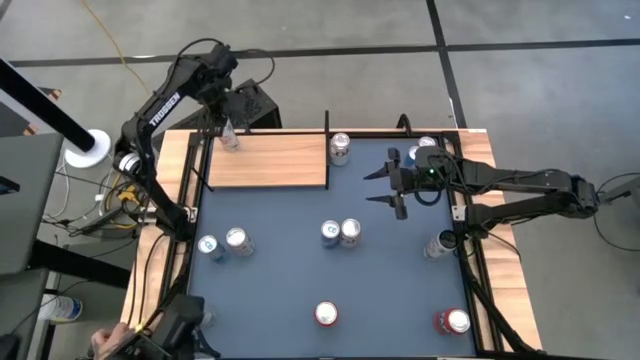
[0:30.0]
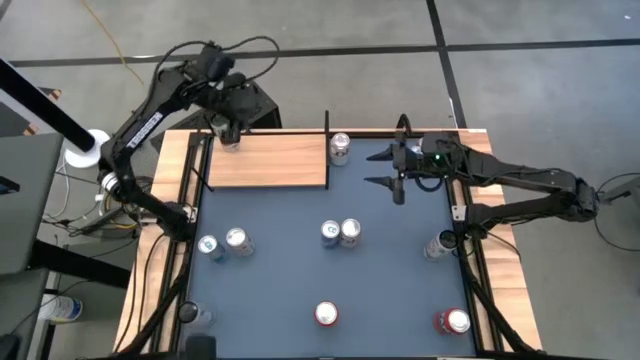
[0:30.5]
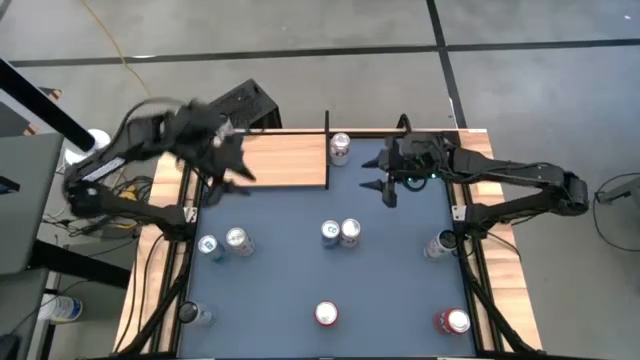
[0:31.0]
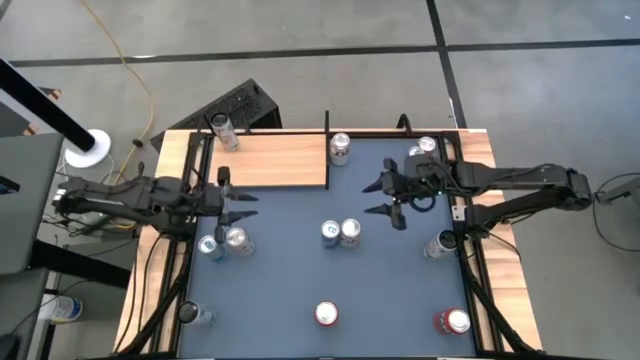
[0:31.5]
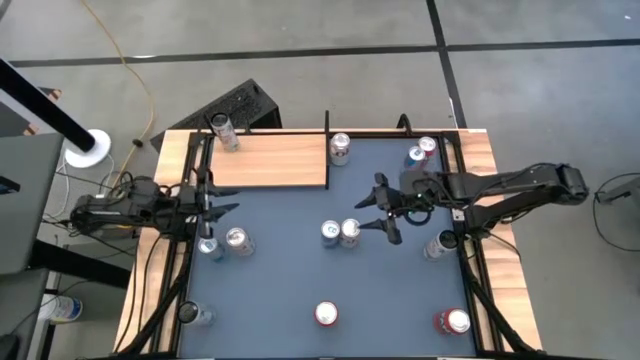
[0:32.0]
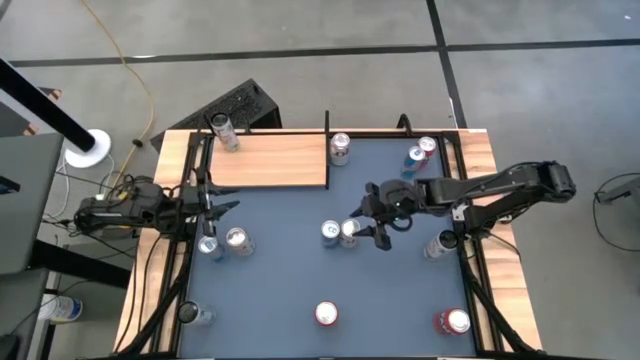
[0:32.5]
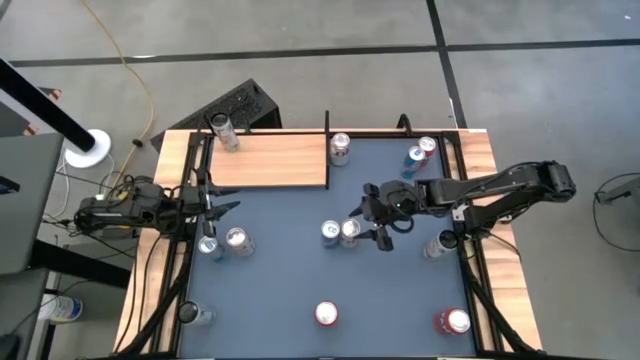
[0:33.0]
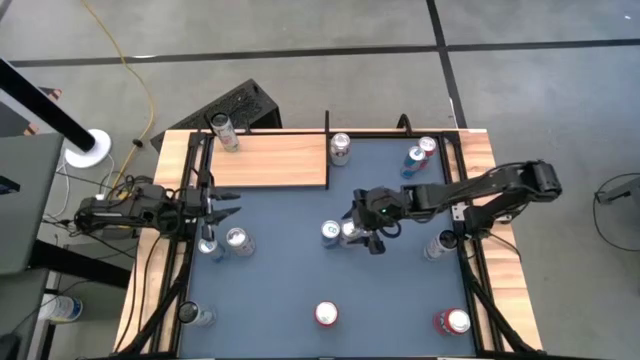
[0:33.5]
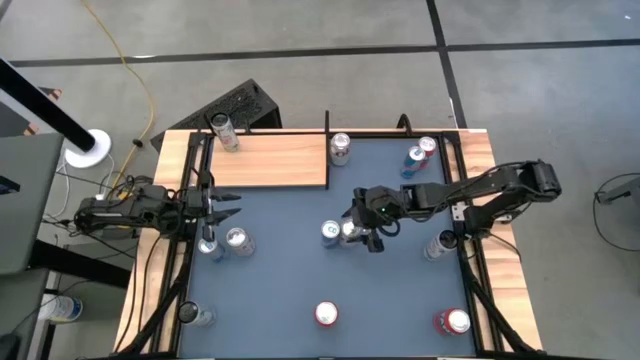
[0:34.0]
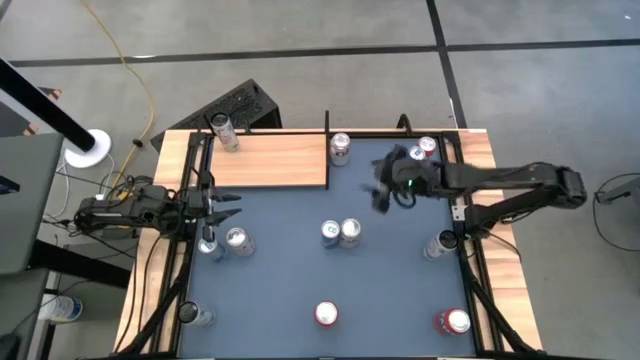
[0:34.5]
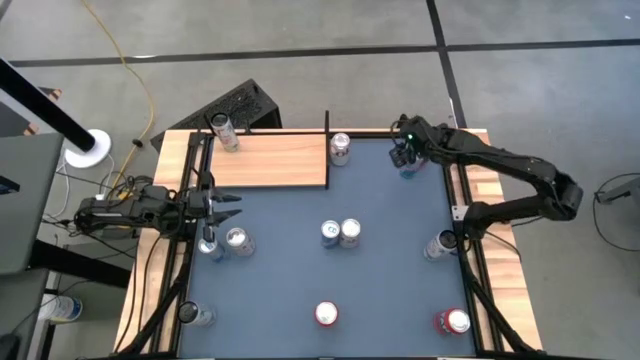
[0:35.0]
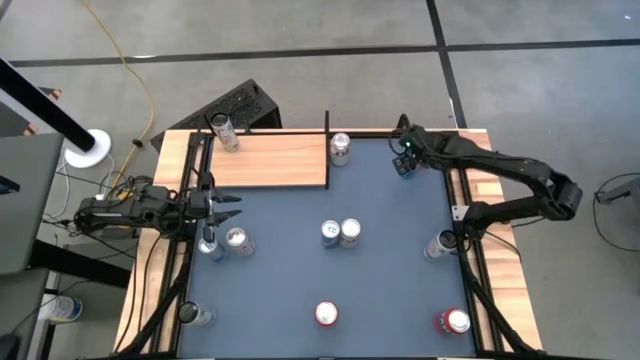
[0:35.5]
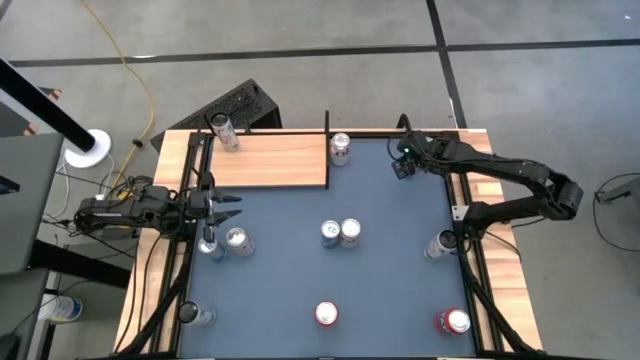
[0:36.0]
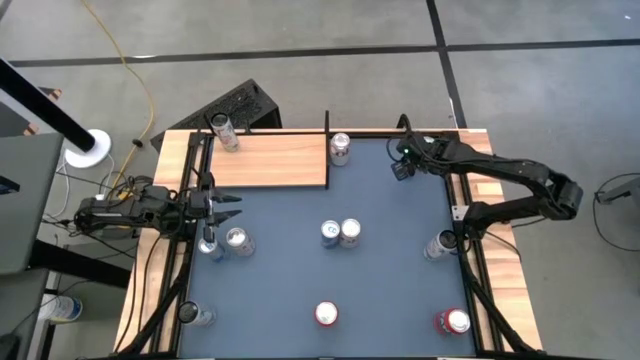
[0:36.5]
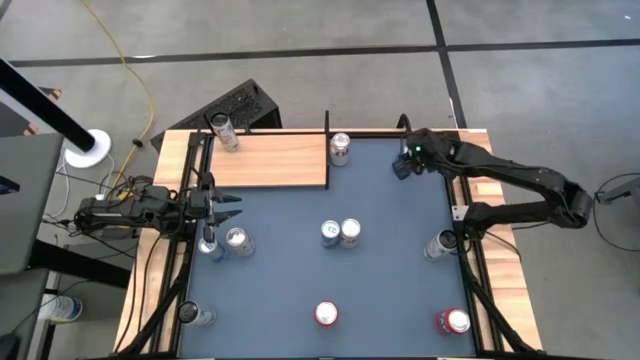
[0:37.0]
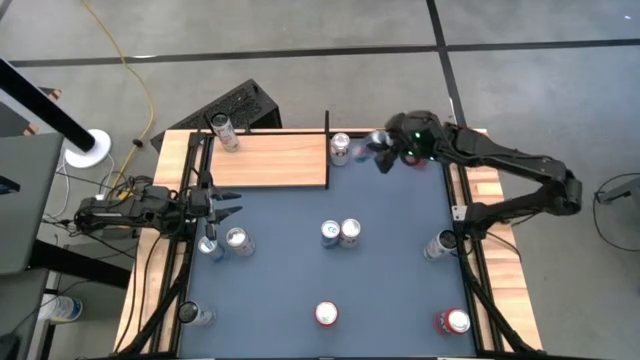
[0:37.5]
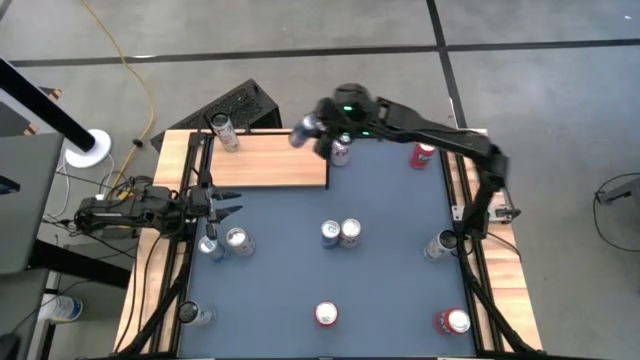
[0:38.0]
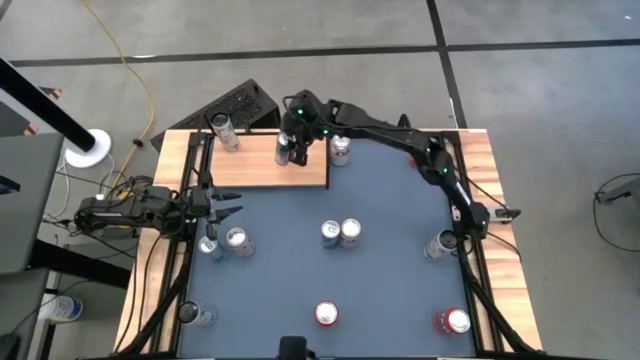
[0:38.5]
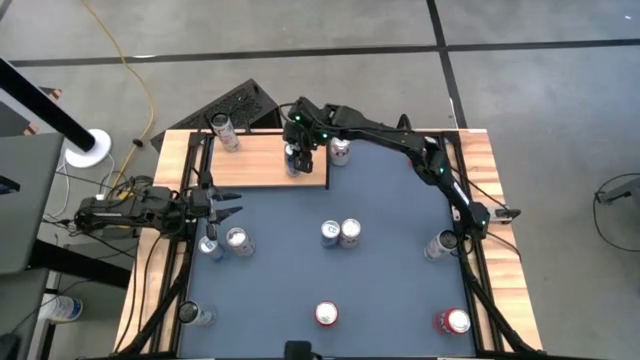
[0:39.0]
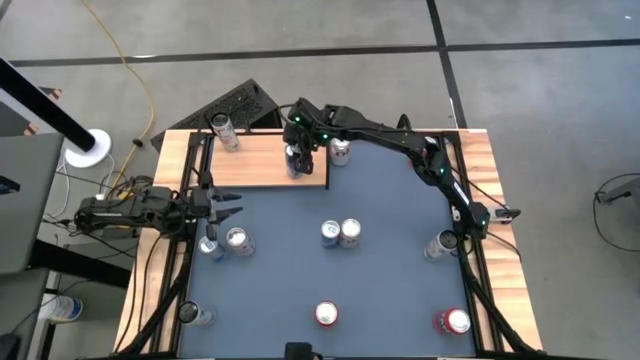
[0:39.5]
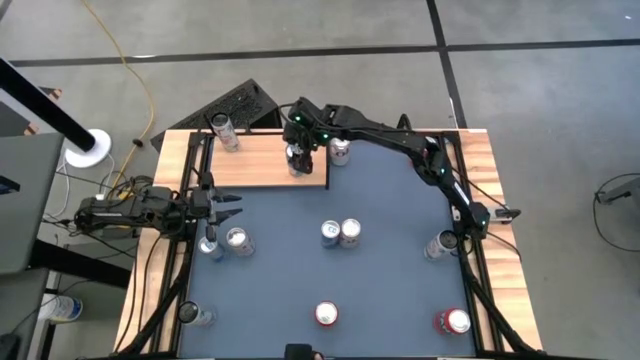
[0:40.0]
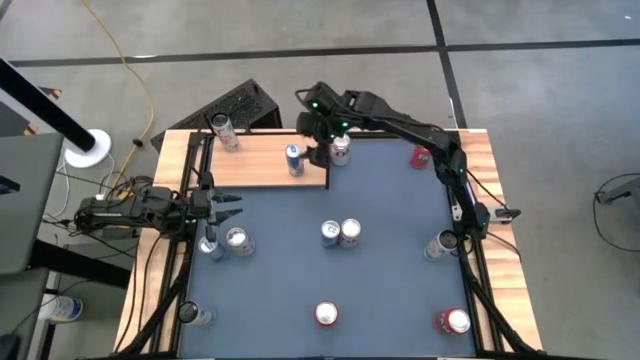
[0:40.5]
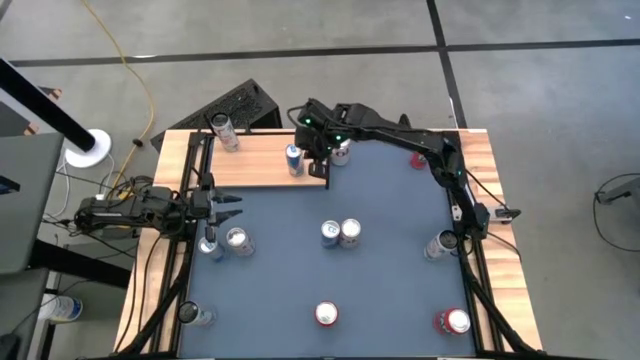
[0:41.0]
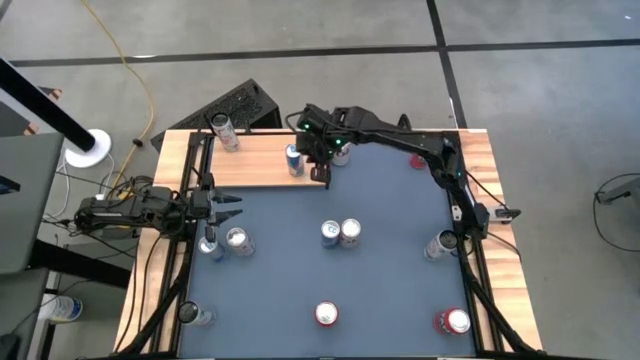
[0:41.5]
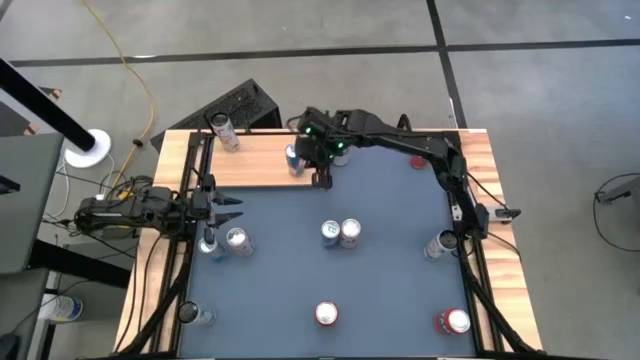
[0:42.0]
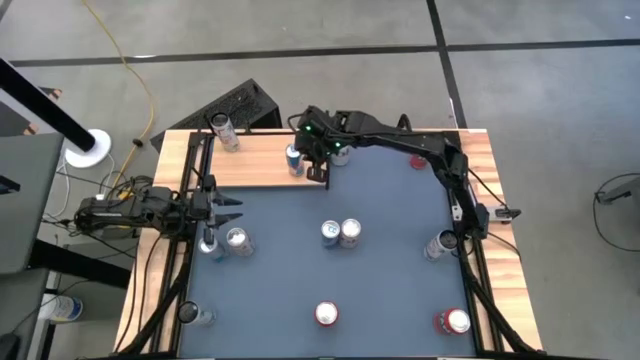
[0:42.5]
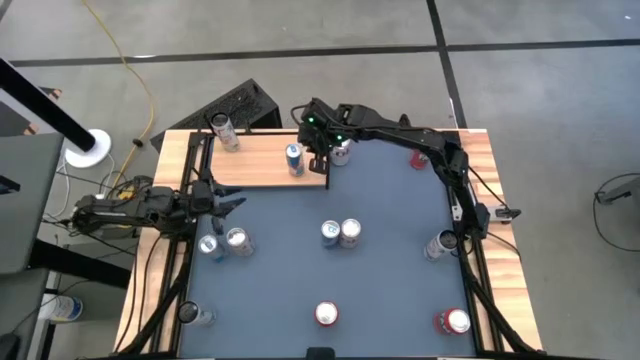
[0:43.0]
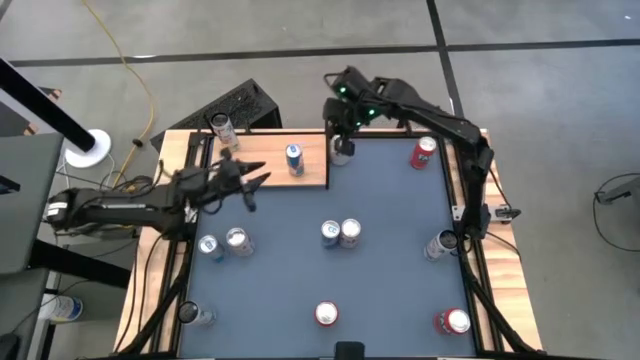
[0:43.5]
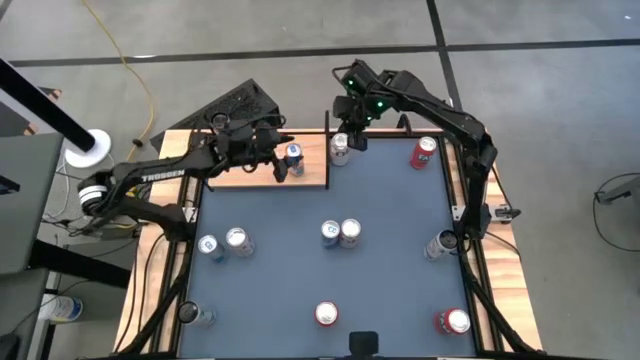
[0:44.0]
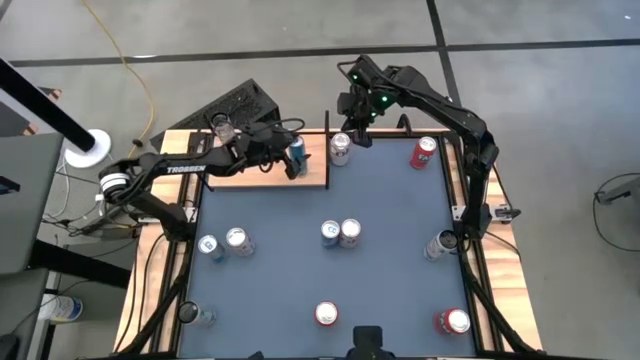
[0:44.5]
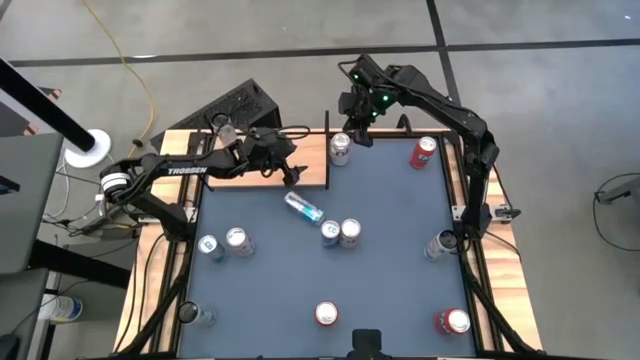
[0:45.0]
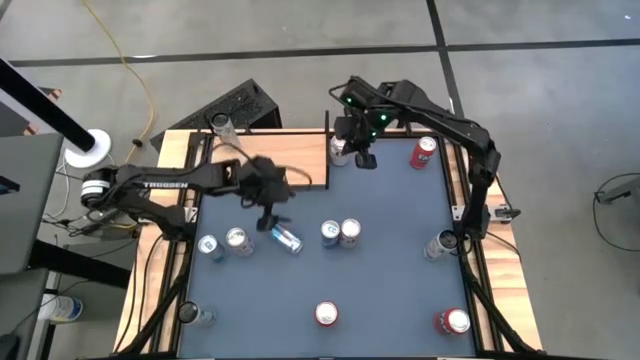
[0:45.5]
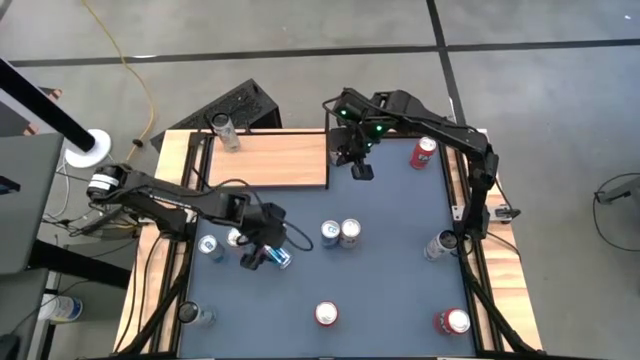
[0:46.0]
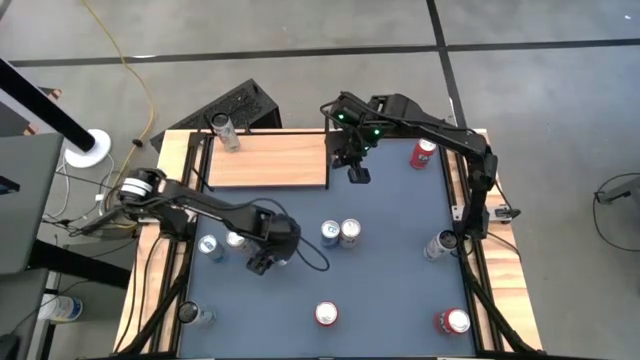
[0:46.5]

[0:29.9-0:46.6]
Task: Place canned beverage on shelf
Put the top right blue soda can on the shelf

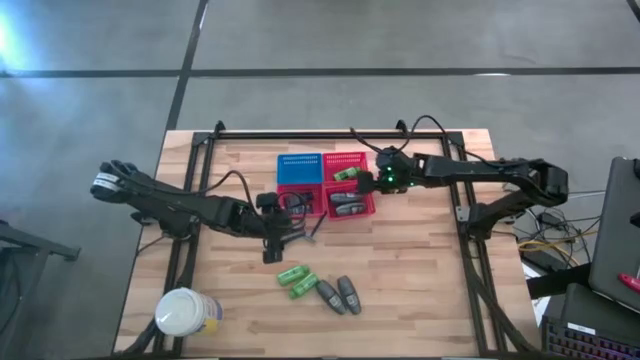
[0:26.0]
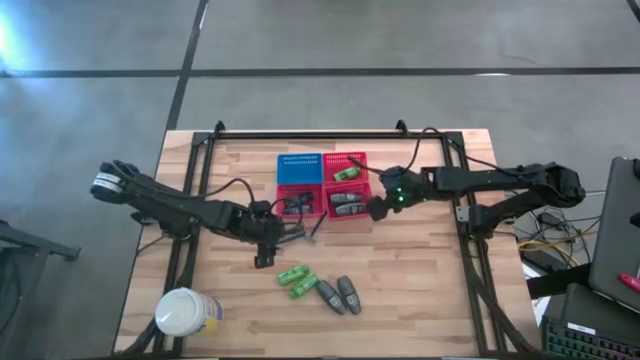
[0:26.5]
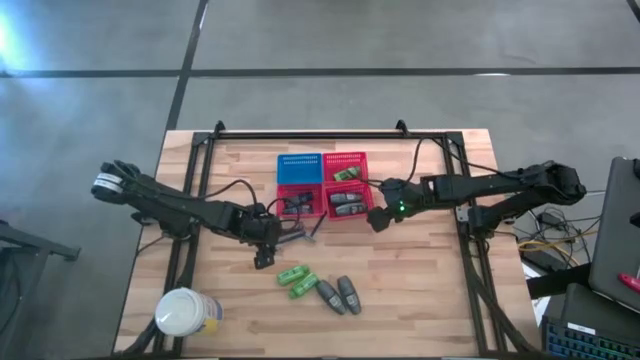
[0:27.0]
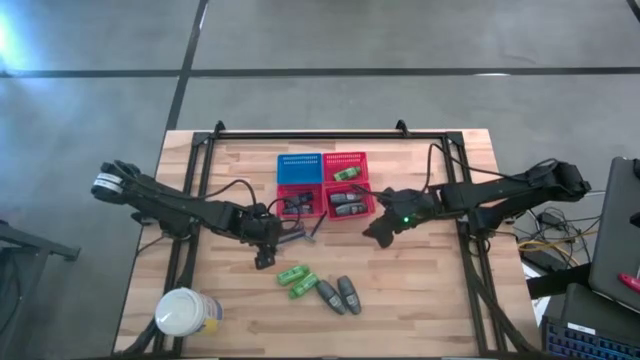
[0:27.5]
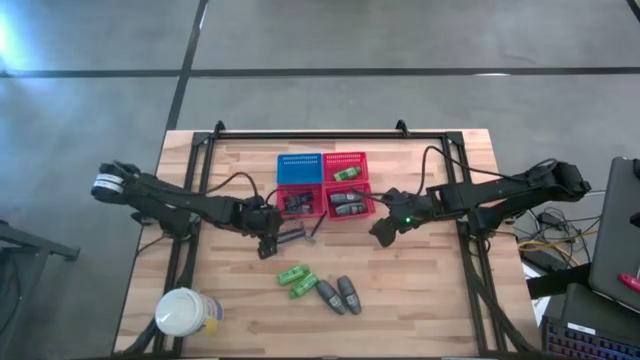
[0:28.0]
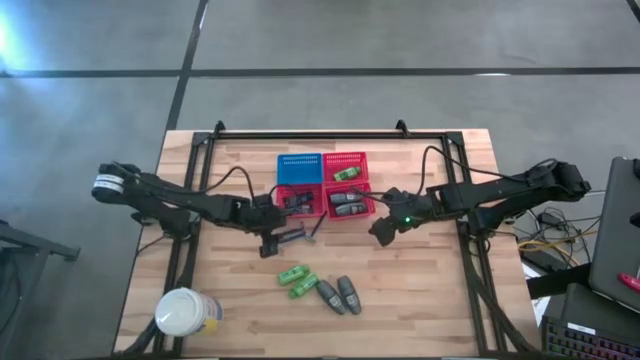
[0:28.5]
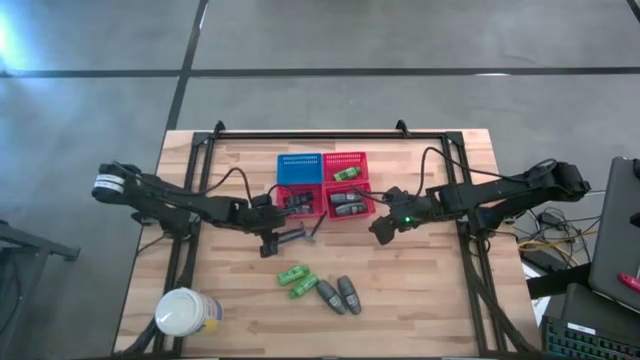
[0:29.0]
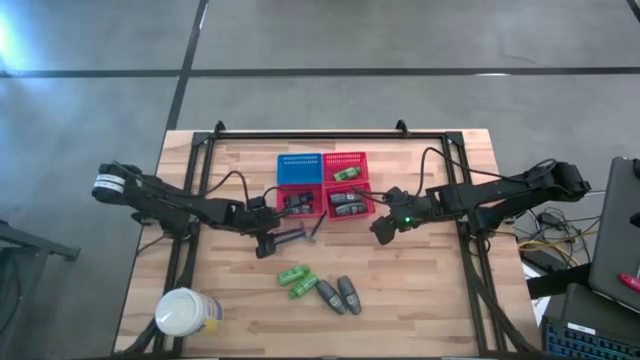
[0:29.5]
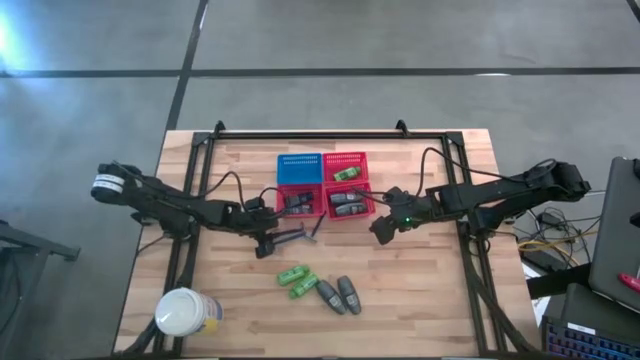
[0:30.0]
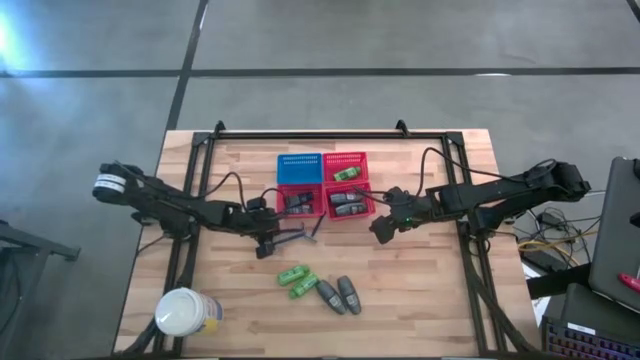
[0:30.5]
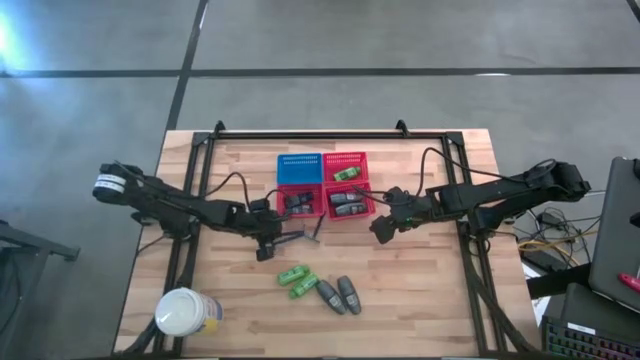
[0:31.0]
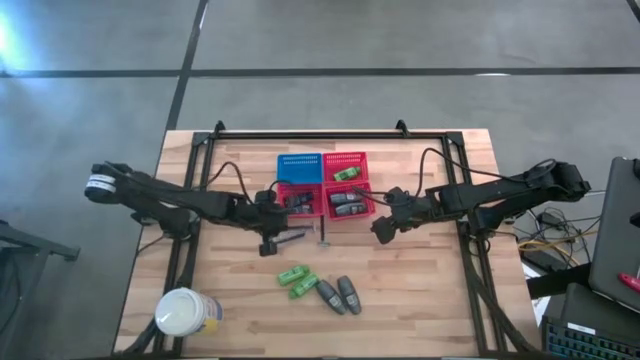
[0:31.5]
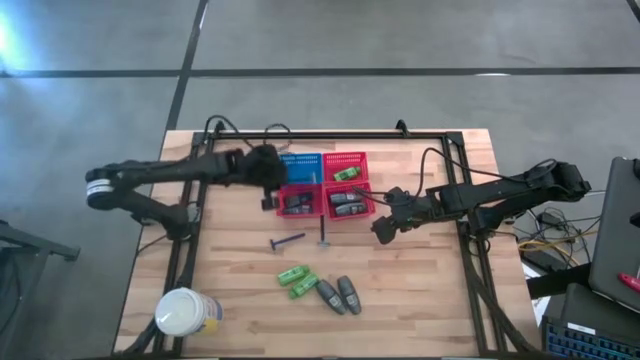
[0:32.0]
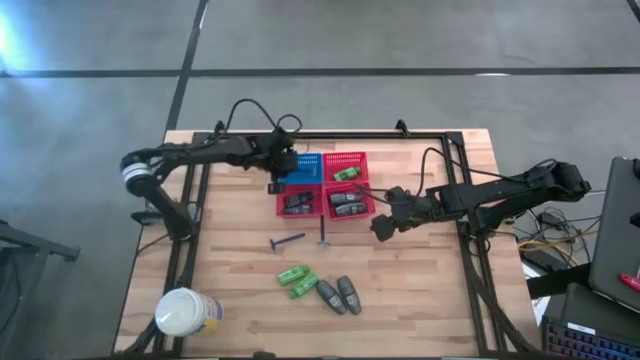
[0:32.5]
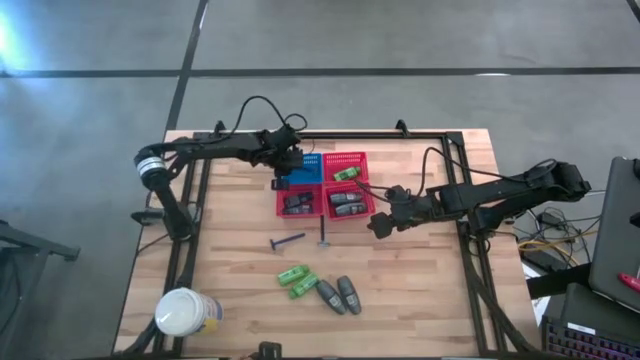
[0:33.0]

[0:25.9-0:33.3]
Task: Pick & Place Travel size toiletries
Put the razor into the blue bin
